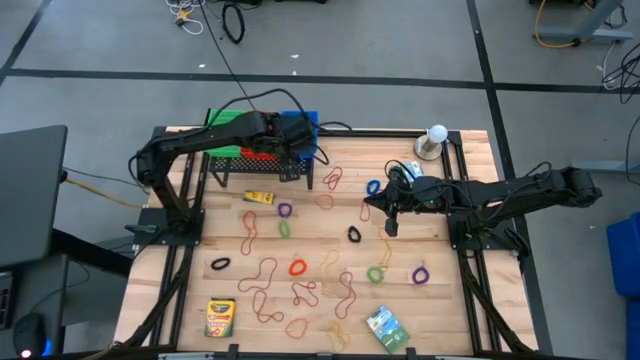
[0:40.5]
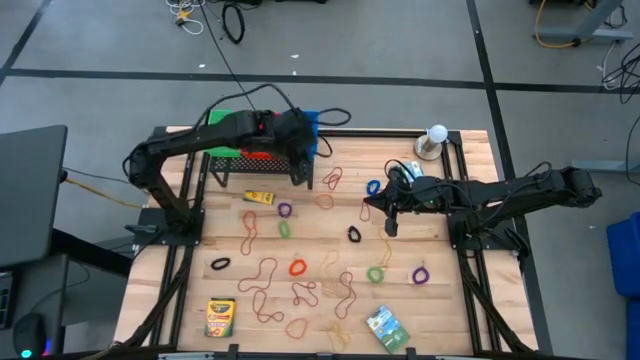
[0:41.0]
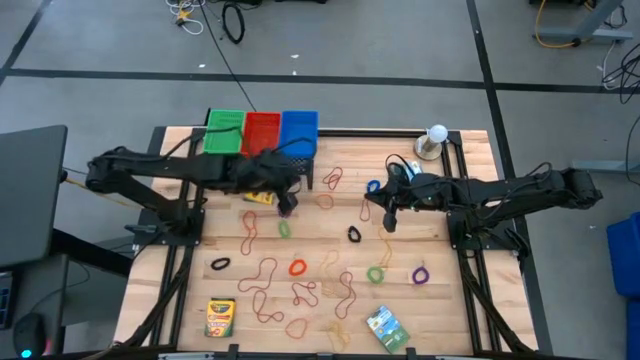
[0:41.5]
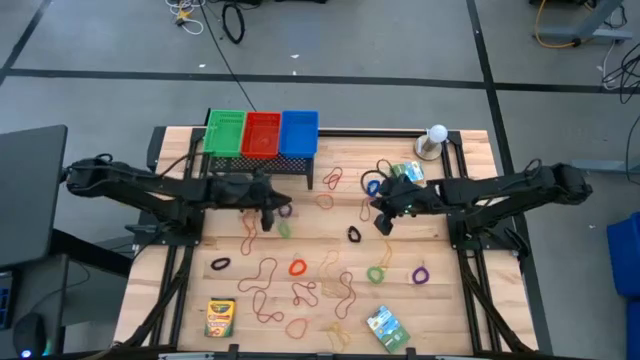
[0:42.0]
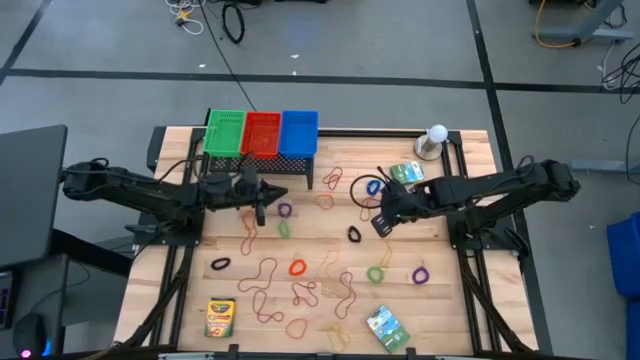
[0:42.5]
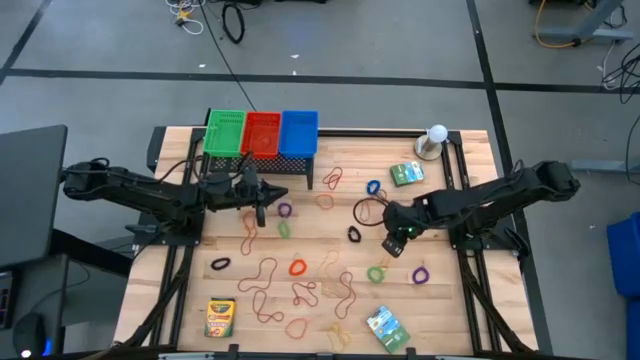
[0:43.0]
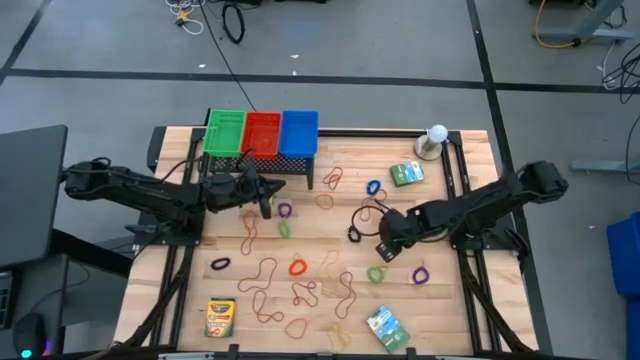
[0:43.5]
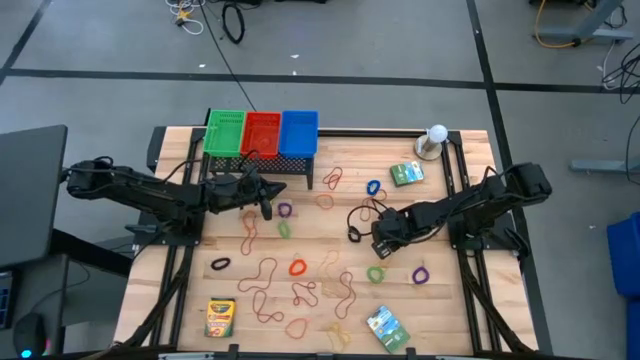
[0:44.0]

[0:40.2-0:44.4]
Task: Pick & Place Office Desk Supplies
Put the yellow rubber band into the green bin on the shelf

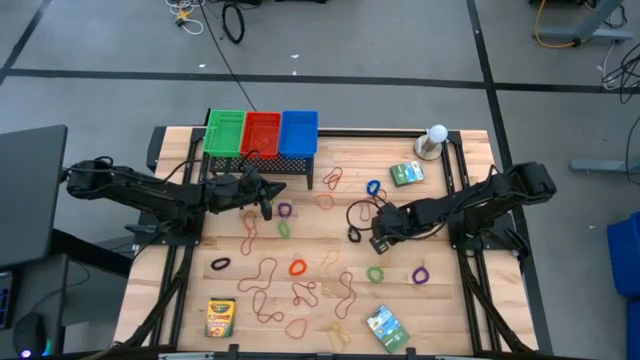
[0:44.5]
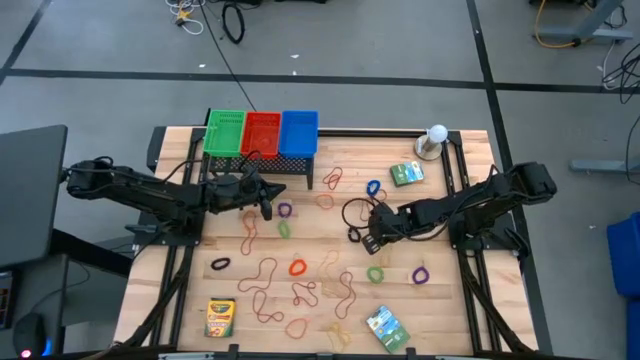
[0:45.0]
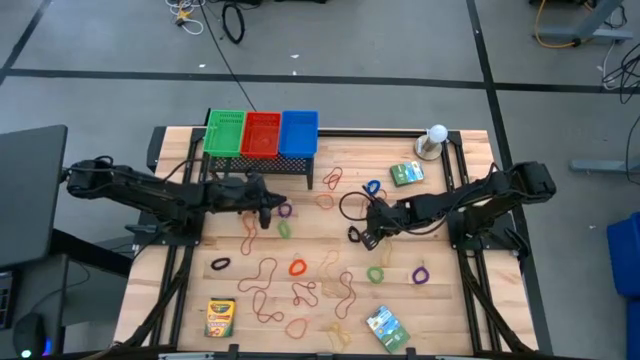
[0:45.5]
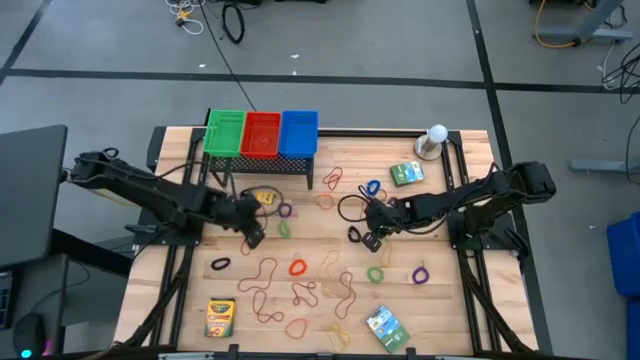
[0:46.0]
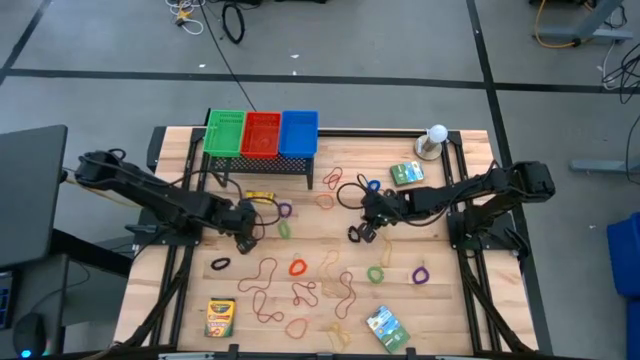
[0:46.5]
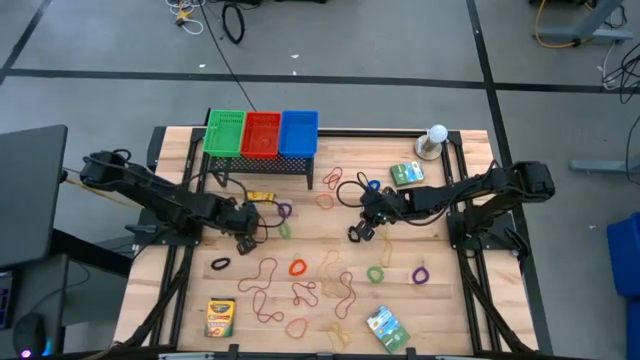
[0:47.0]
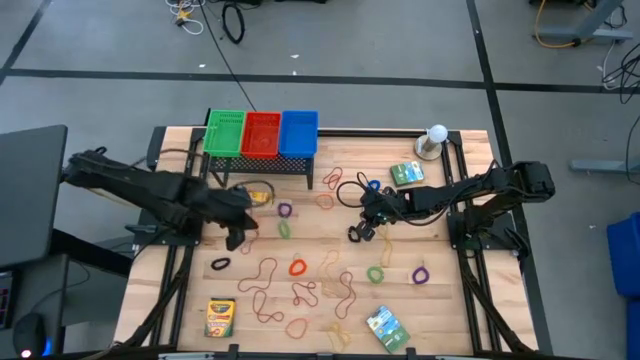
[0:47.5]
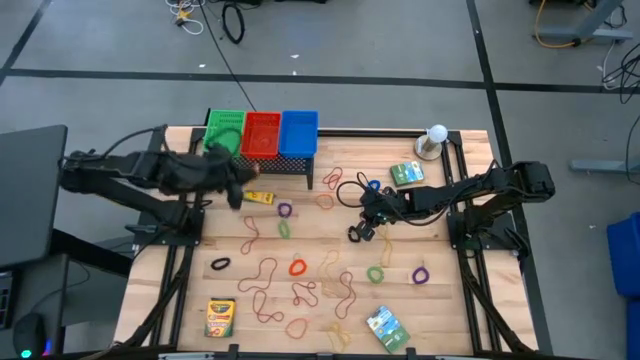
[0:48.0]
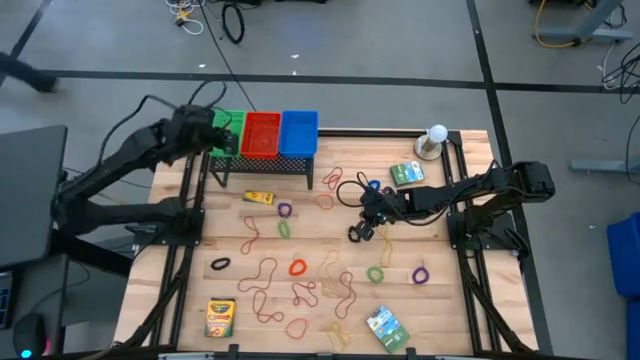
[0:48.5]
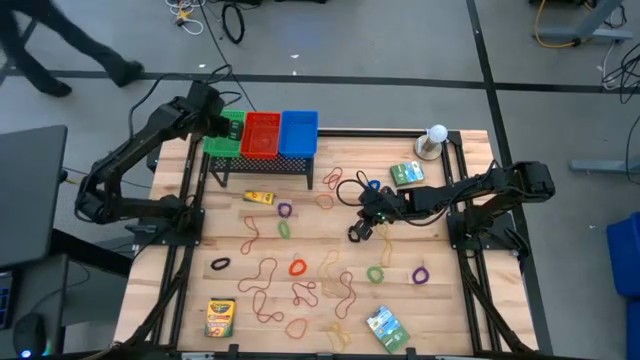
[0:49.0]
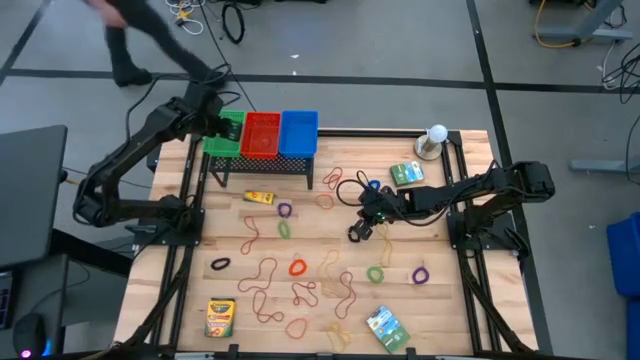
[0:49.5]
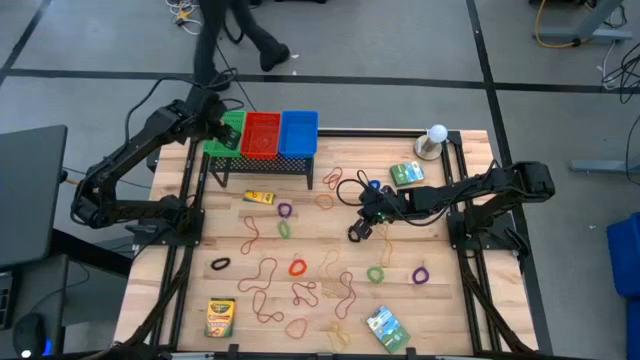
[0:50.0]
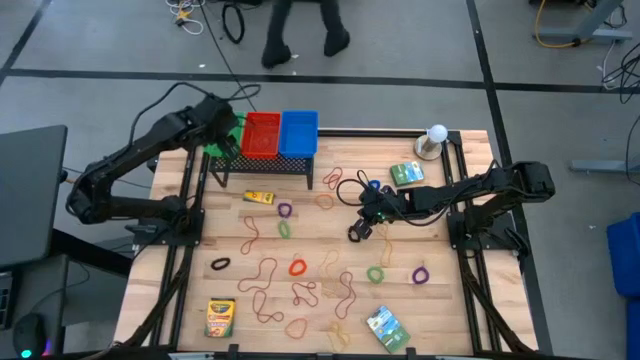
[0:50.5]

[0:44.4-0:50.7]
Put the orange rubber band into the green bin on the shelf

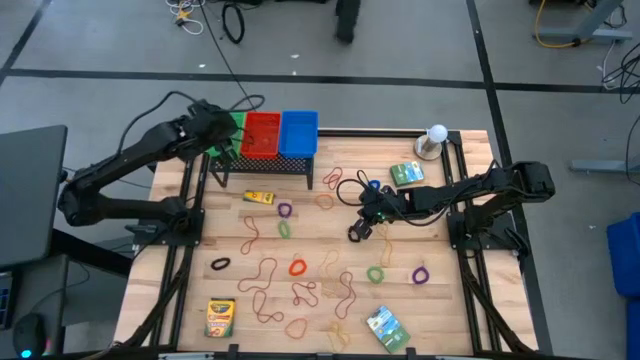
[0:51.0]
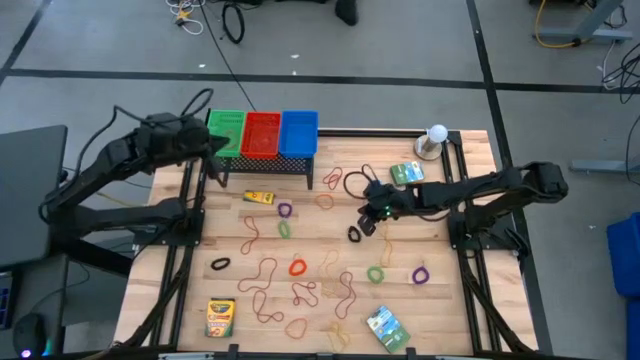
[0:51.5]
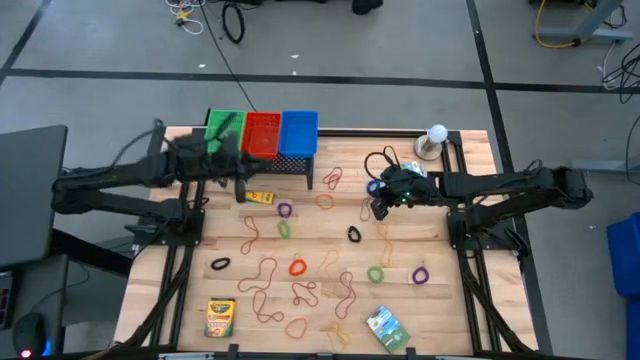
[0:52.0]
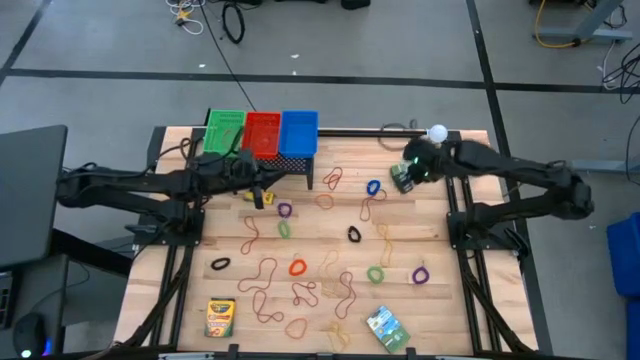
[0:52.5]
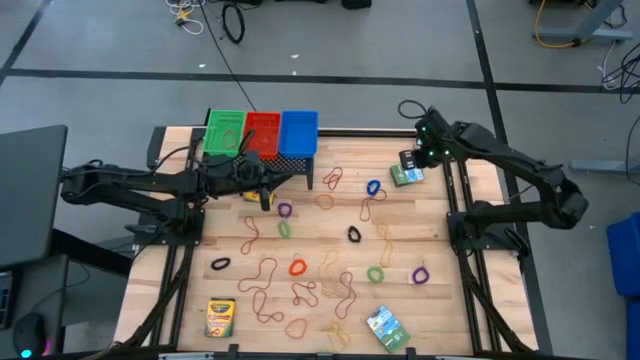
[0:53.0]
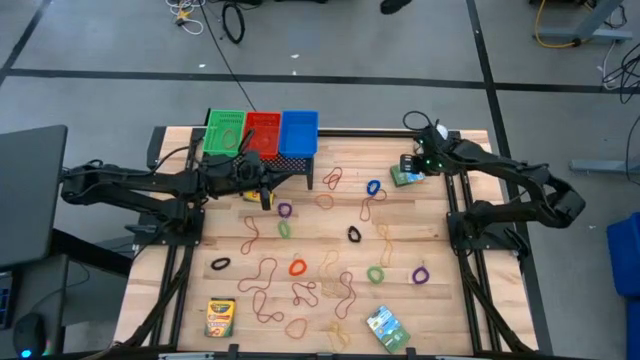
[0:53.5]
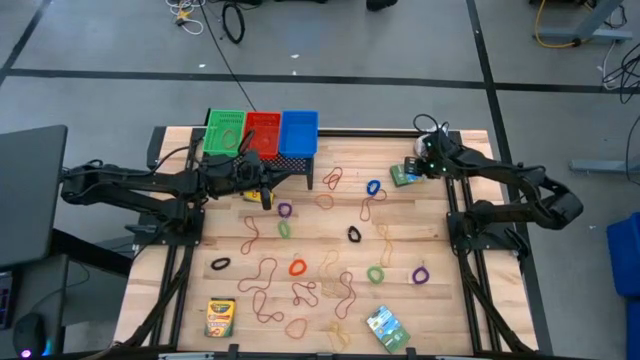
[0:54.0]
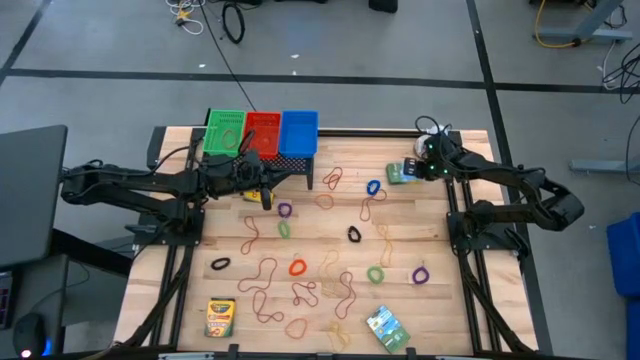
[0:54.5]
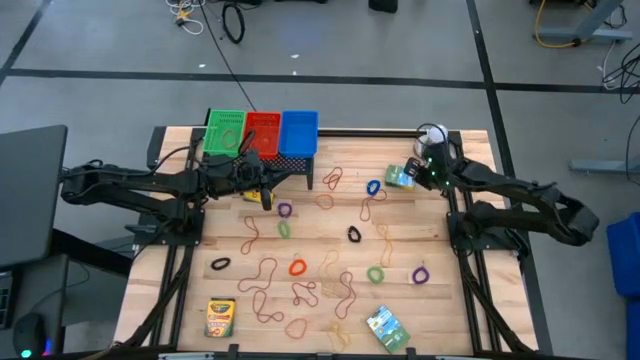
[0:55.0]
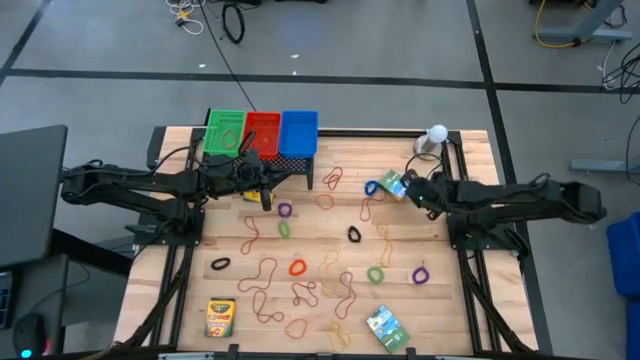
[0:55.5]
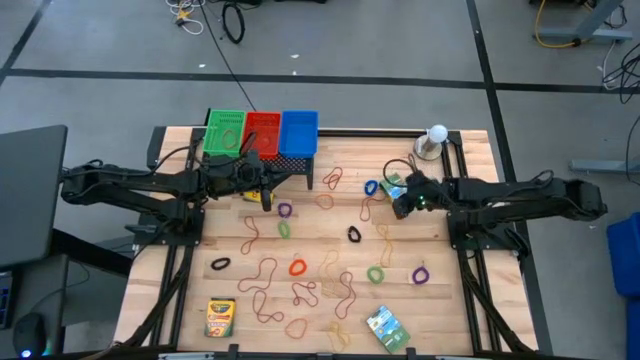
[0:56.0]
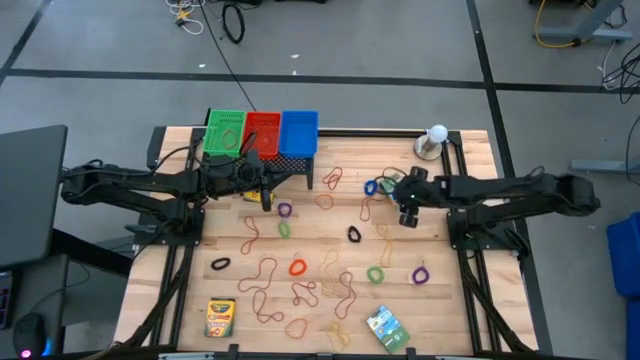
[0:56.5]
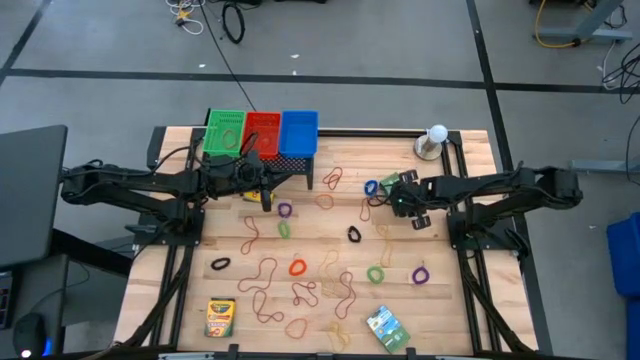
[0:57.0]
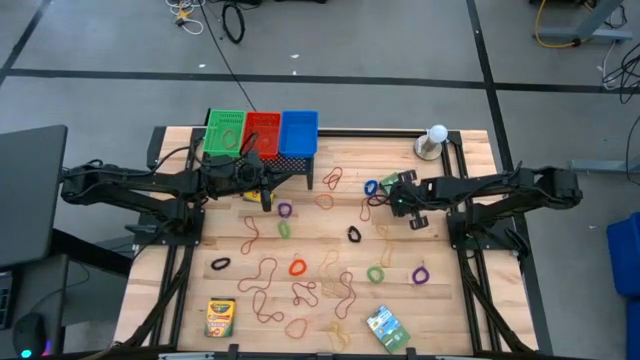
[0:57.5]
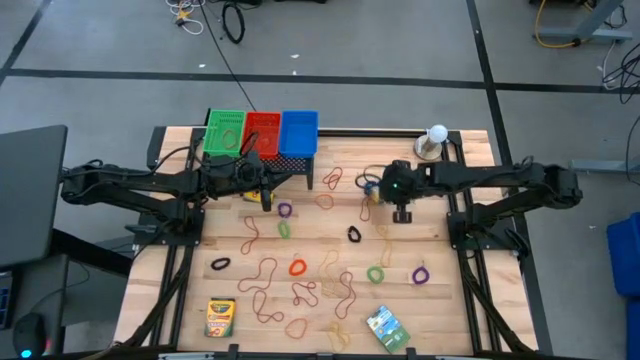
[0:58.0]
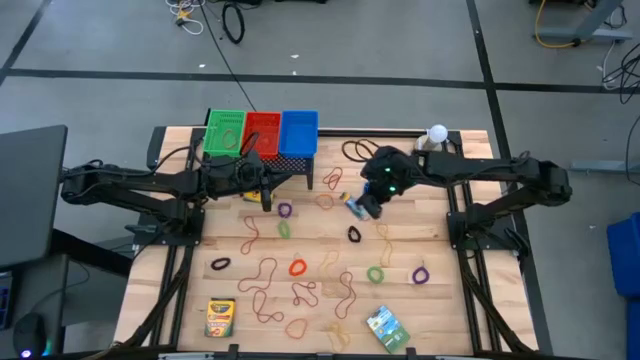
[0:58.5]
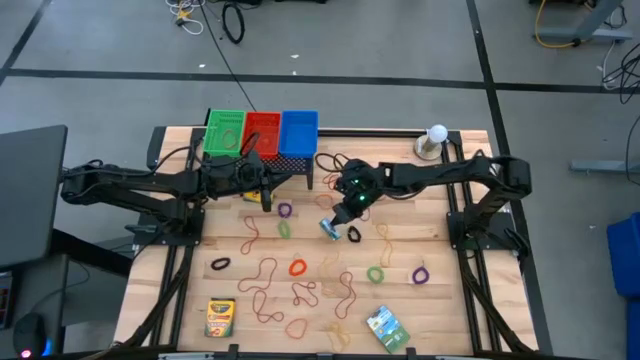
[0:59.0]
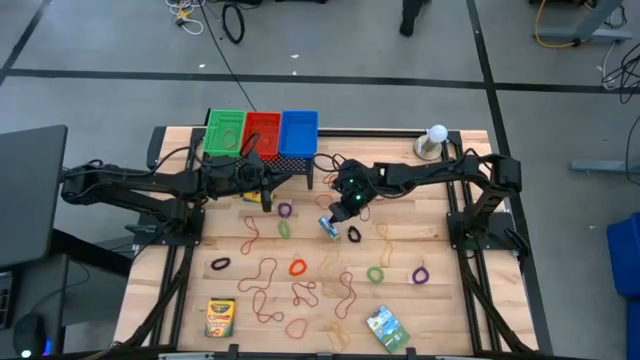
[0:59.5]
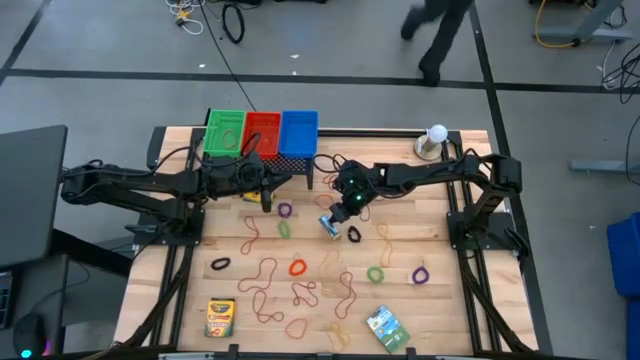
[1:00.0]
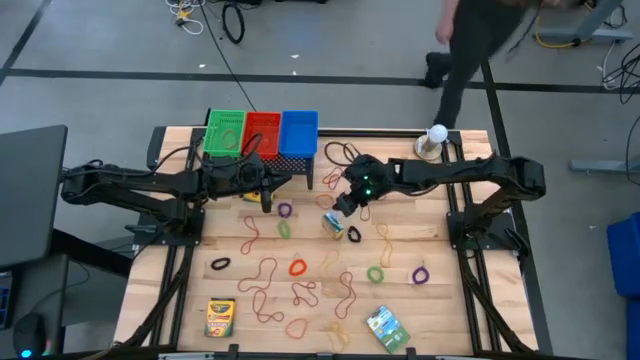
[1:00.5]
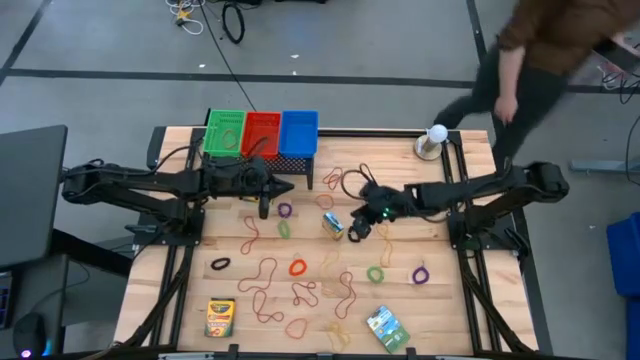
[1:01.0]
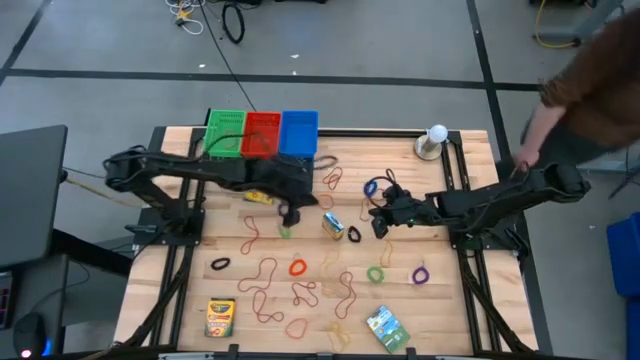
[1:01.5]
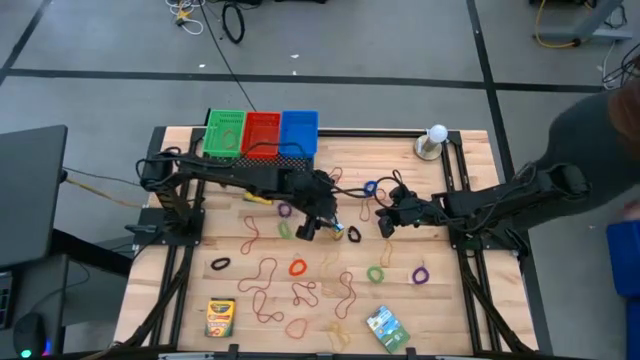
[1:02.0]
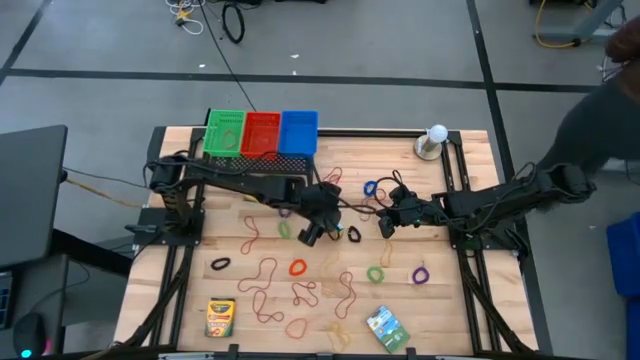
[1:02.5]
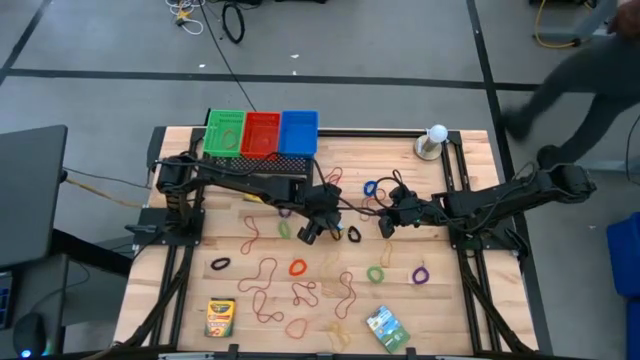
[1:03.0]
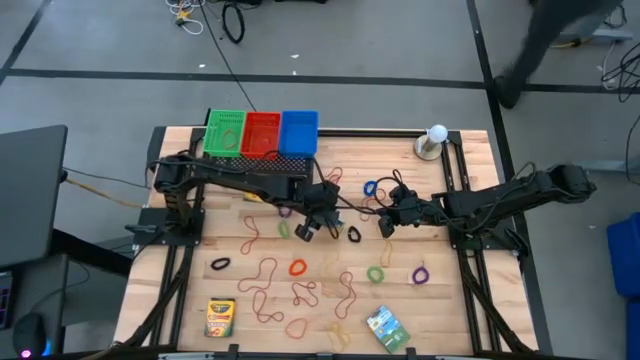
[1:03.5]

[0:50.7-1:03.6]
Put the big box of crayons into the blue bin on the shelf
